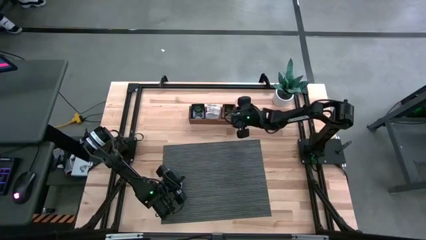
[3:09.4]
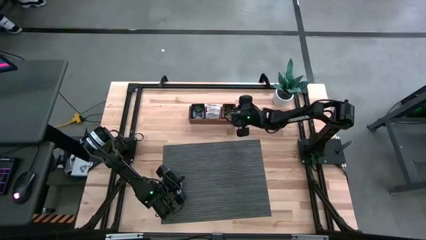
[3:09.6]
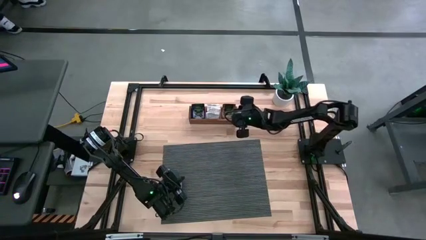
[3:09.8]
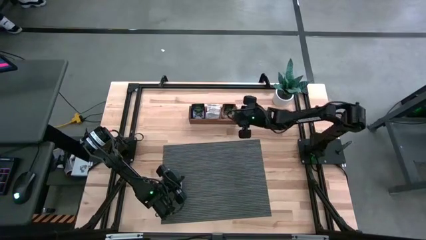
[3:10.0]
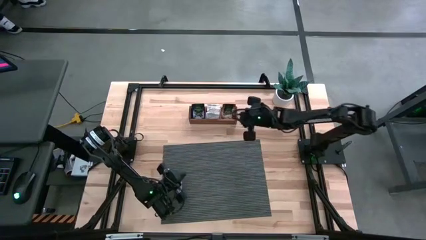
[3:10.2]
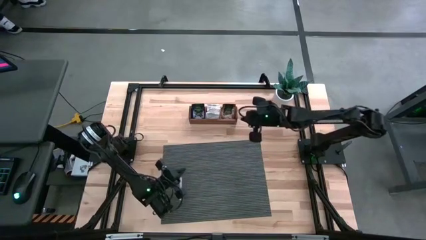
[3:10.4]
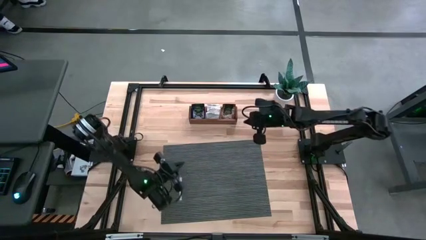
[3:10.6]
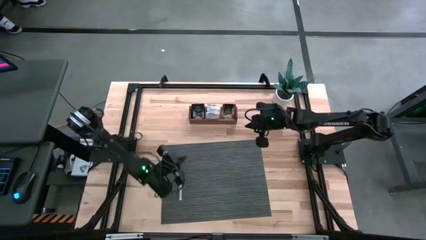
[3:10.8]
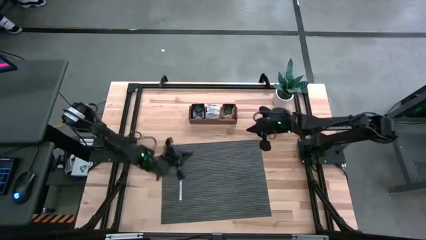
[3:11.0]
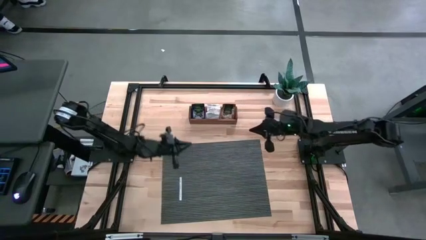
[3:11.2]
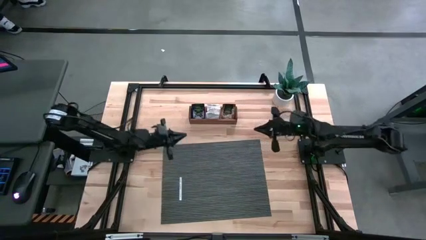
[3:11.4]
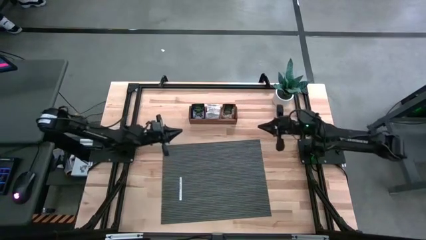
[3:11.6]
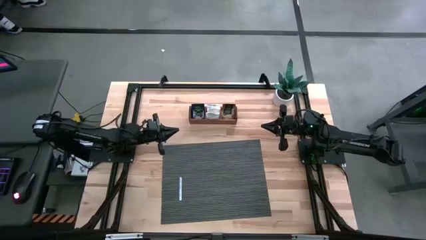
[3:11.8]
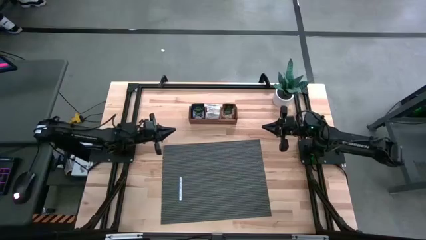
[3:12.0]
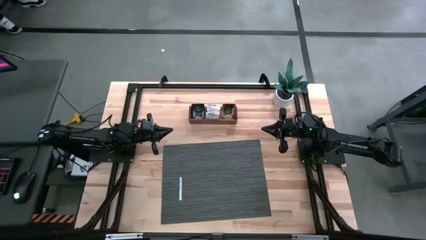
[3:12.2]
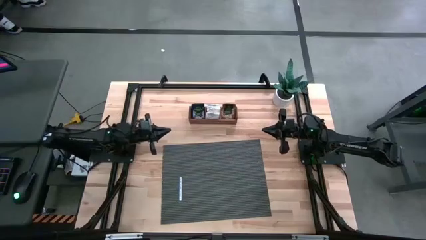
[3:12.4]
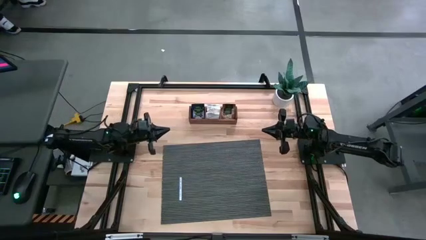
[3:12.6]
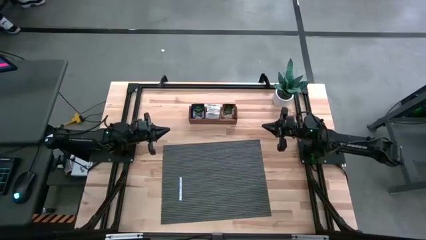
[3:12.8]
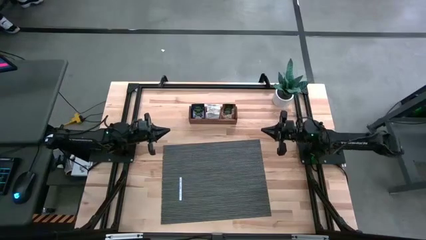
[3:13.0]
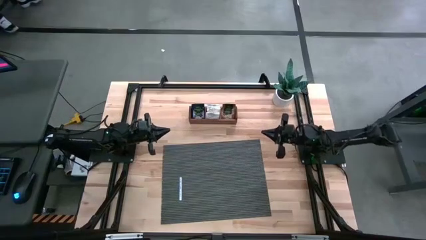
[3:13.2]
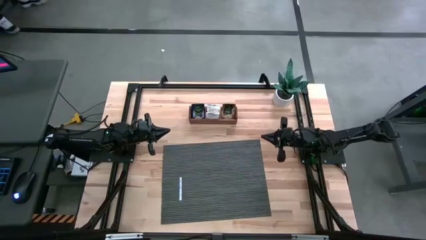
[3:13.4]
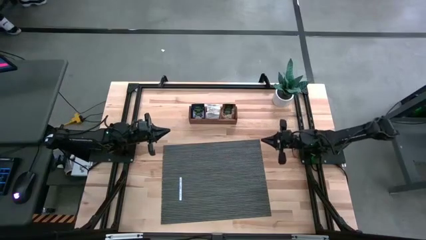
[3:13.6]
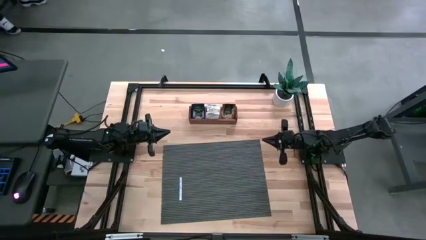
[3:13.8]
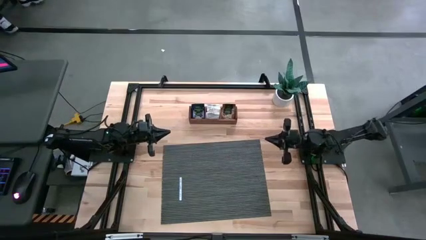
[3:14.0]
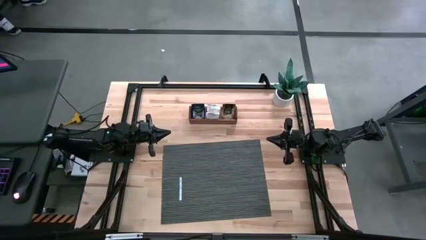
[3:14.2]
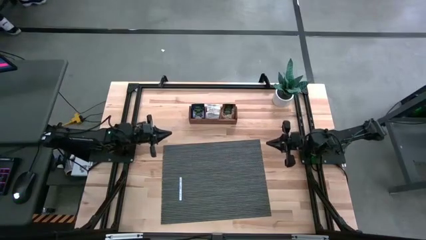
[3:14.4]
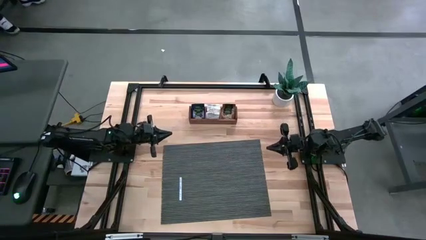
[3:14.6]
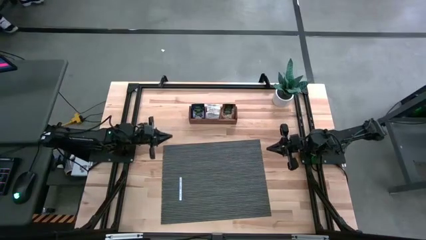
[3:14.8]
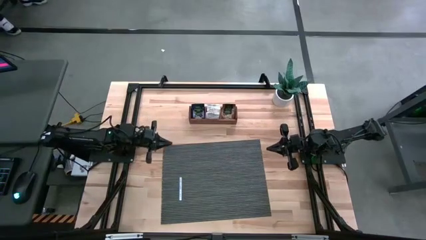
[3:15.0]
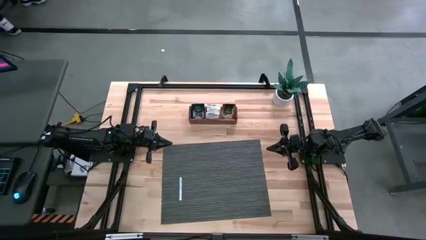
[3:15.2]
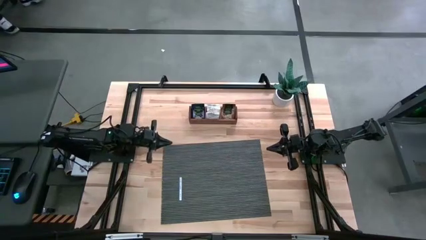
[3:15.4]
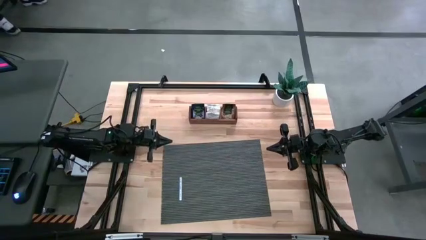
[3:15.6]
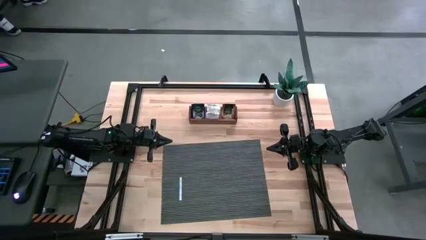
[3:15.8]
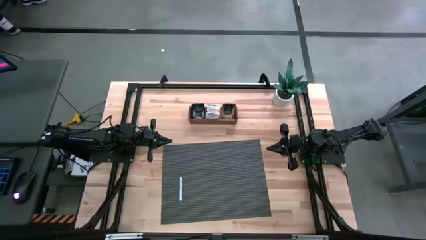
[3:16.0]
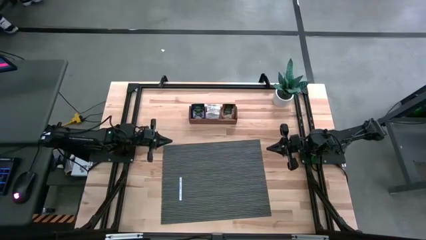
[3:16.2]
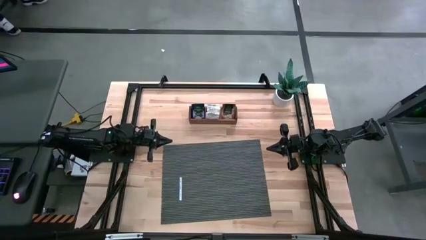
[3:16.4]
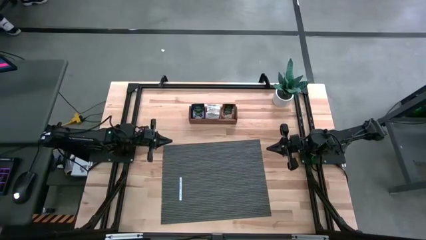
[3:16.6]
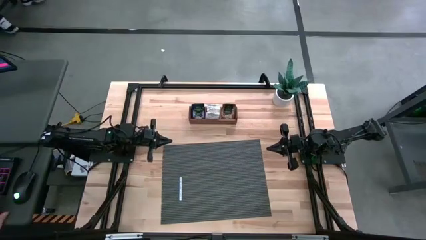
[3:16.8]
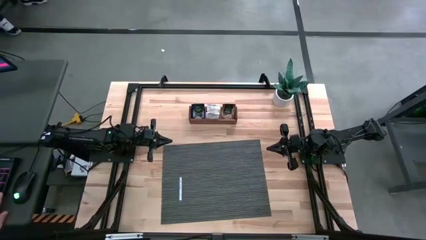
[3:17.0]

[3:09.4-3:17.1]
Task: Pick & Place Tea
Return to Home Position

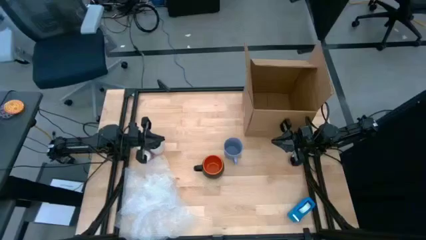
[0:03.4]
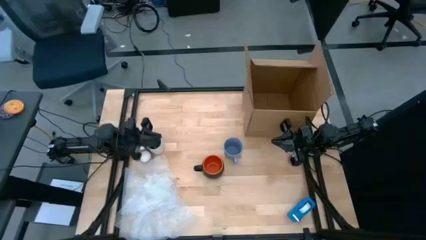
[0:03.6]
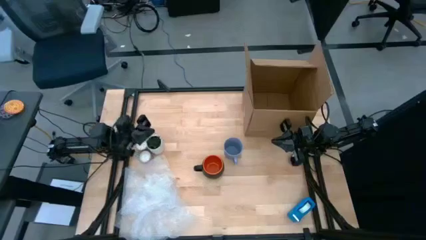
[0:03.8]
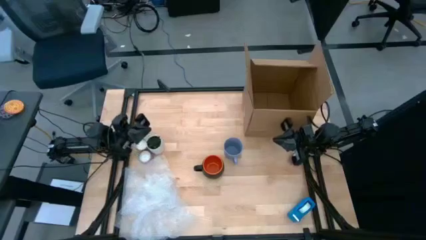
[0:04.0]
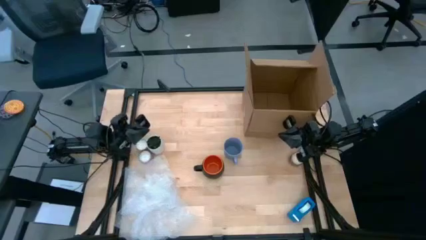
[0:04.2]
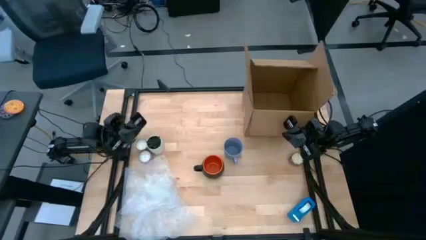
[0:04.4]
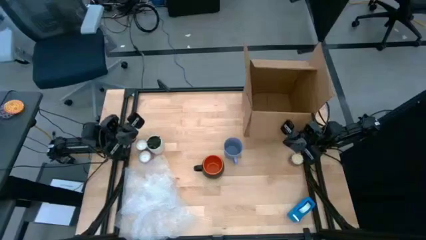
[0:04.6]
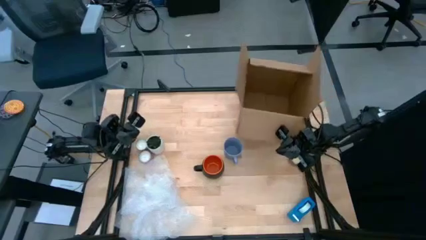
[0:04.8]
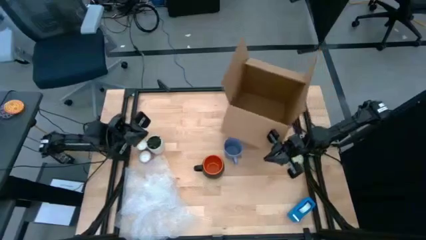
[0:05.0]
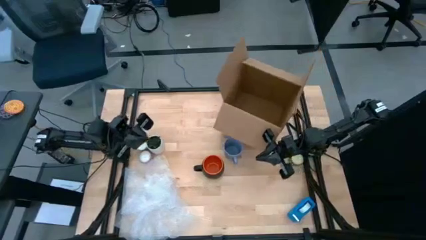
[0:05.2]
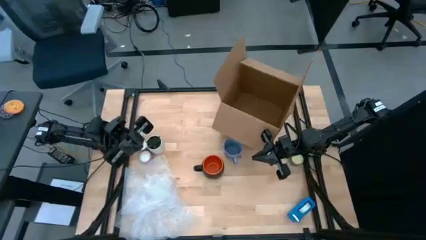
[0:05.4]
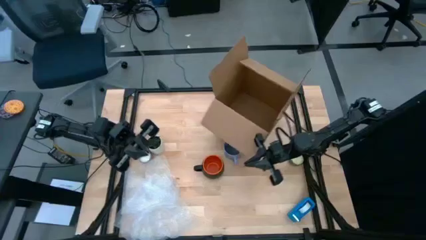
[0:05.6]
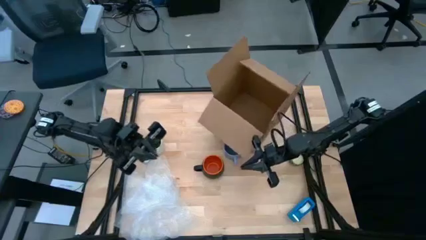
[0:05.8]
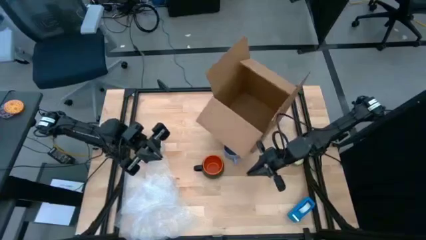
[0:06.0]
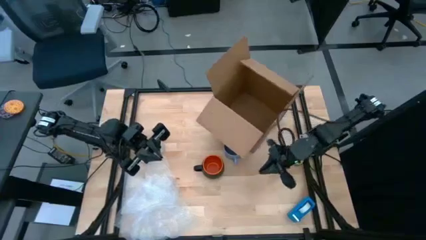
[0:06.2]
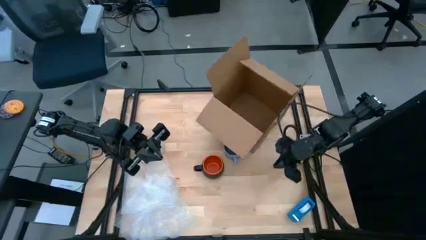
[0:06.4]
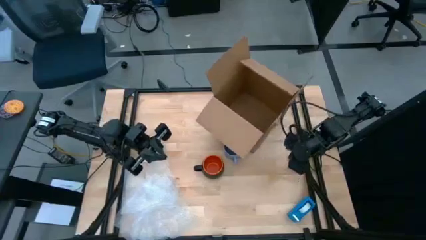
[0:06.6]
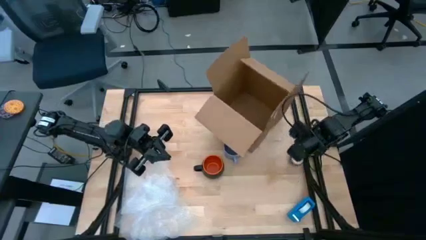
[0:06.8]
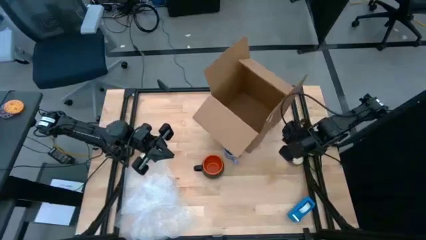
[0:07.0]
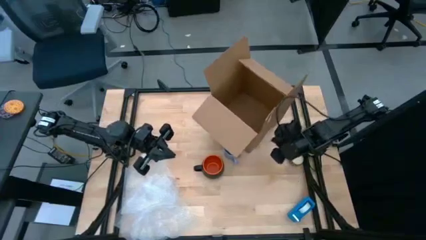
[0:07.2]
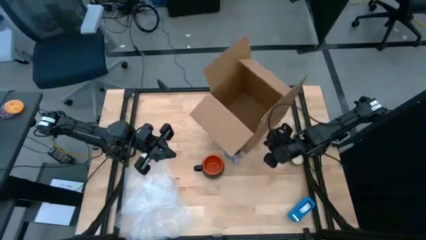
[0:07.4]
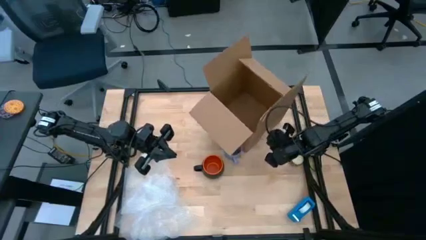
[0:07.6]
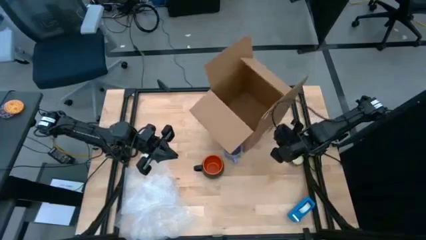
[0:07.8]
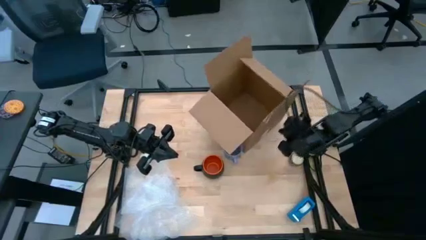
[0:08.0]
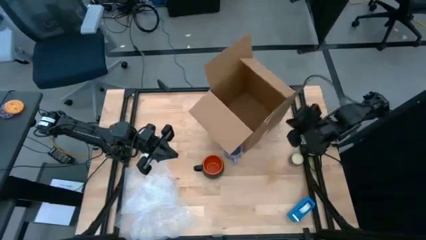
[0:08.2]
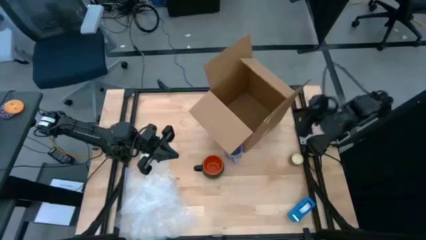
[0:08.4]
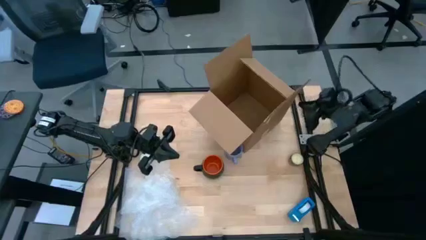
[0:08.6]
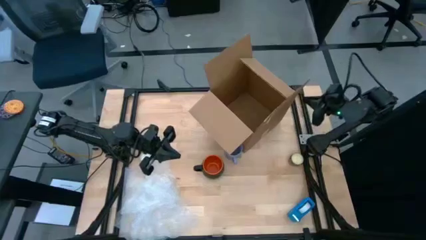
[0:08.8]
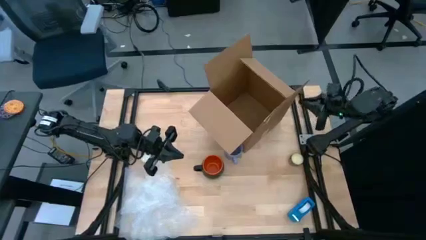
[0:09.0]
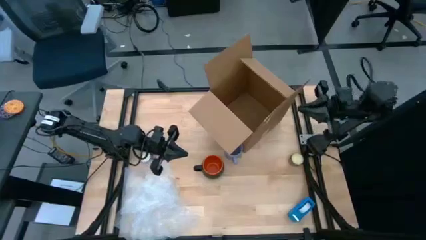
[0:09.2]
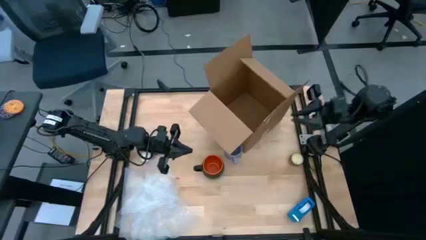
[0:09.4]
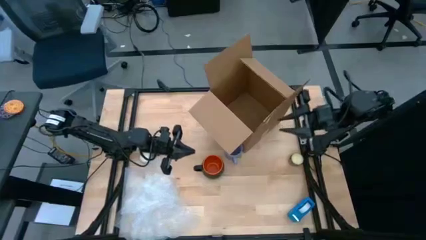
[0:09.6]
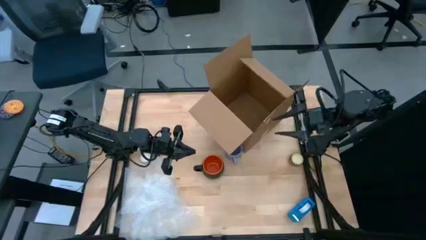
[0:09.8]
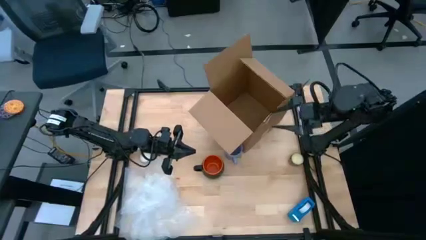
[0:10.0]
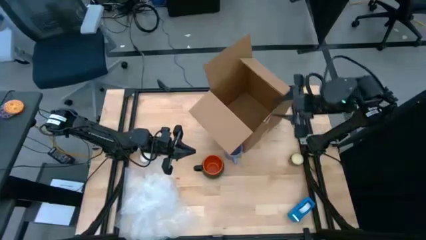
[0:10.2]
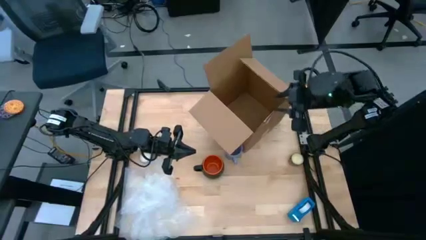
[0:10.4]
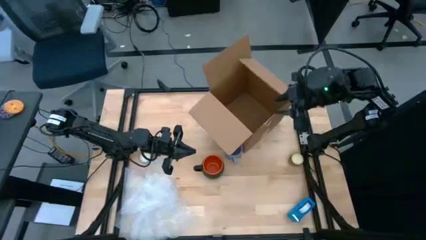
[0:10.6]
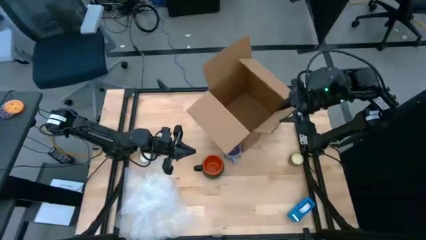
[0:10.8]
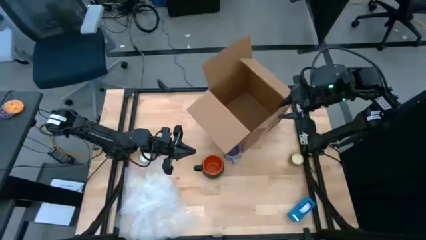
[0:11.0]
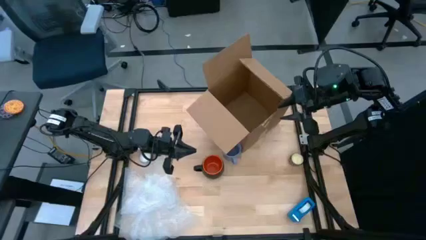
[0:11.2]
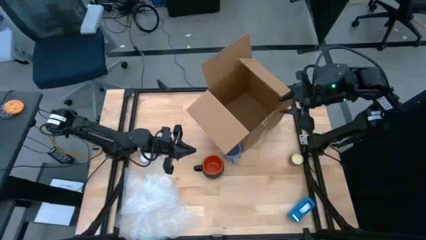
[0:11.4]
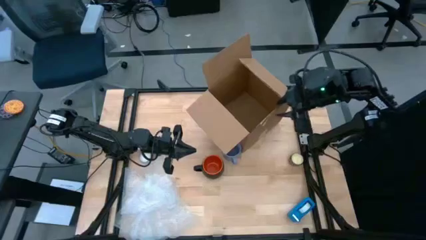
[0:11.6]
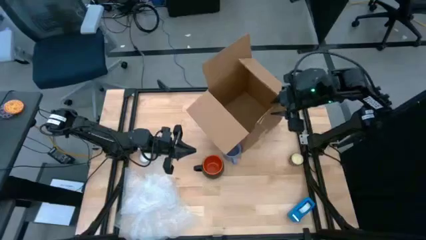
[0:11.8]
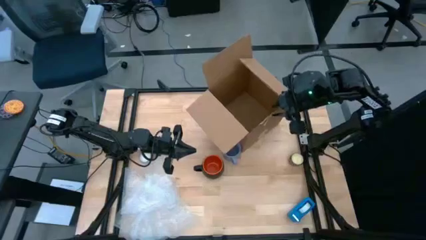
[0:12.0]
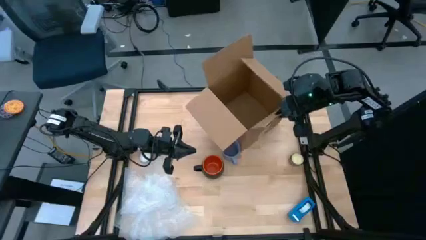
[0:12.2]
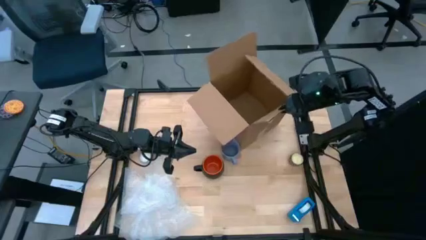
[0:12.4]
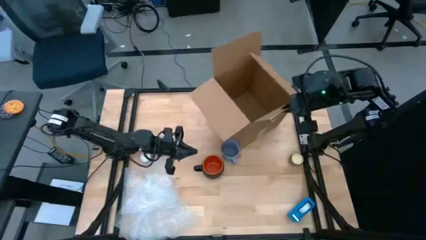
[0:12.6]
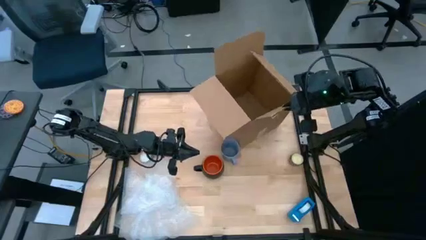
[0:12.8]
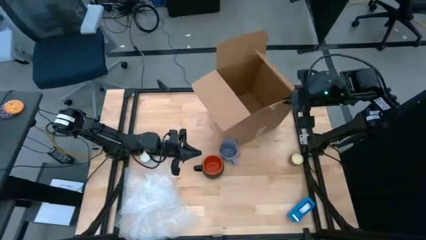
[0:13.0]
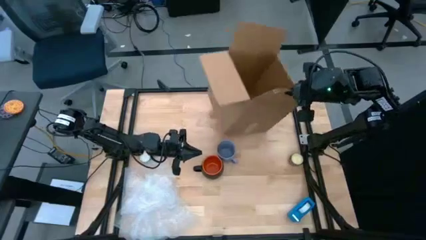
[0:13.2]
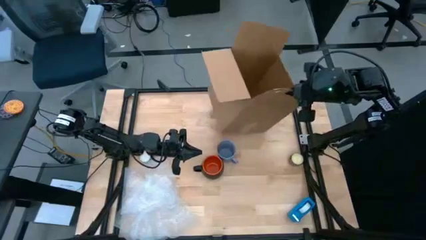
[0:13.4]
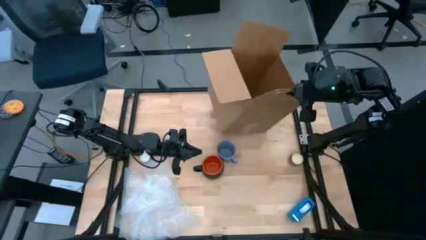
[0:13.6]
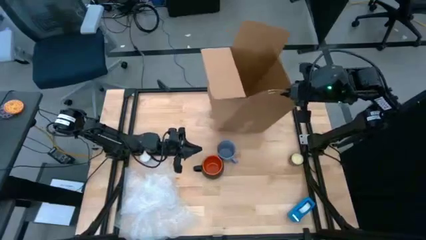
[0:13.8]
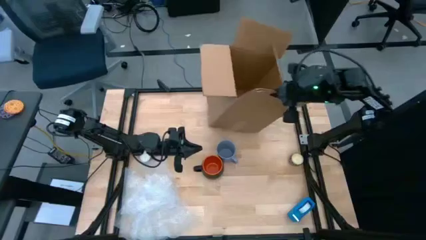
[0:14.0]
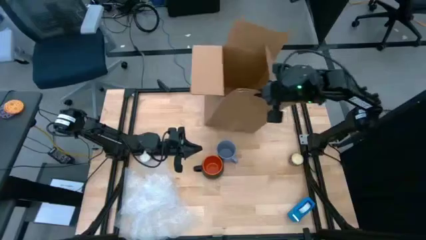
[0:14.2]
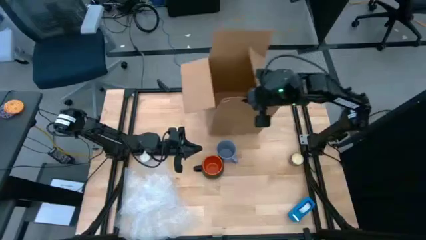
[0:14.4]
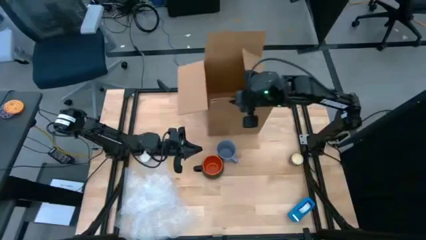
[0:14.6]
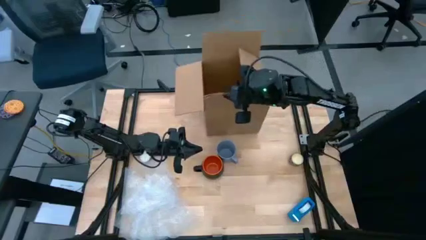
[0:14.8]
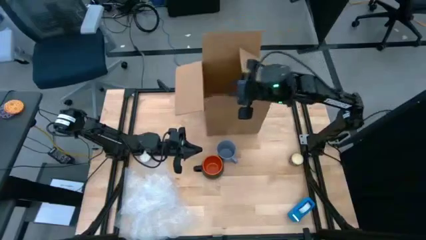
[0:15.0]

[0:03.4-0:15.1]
Task: wrap mug
Move the box to the top middle of the table
